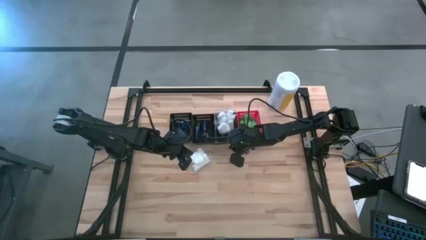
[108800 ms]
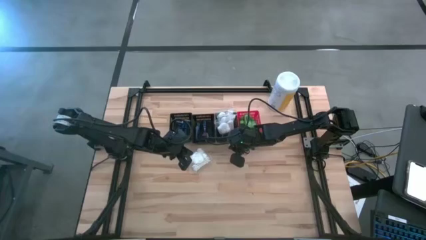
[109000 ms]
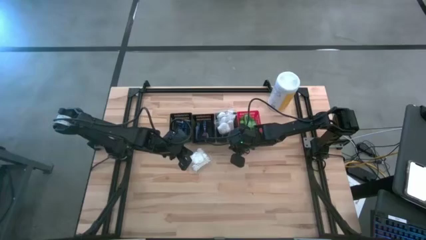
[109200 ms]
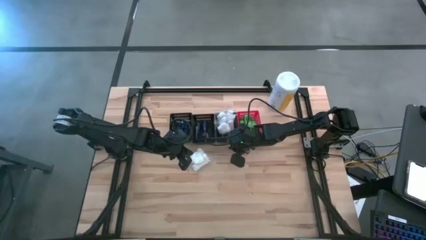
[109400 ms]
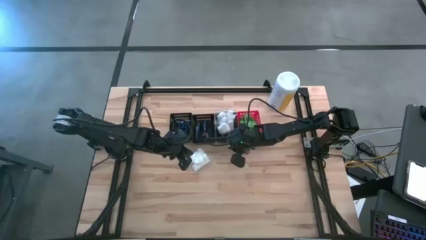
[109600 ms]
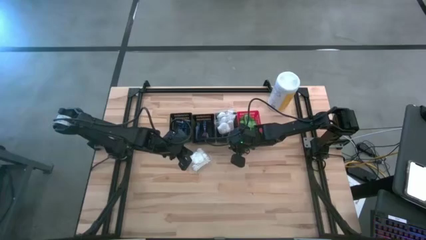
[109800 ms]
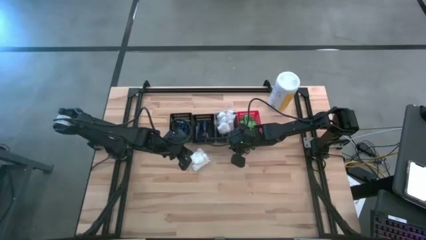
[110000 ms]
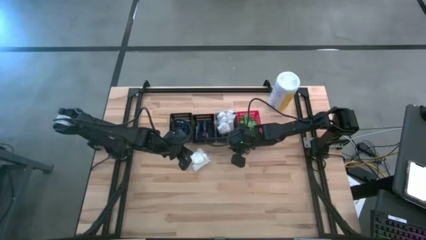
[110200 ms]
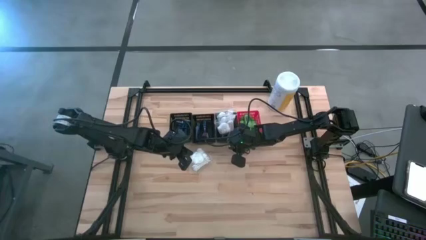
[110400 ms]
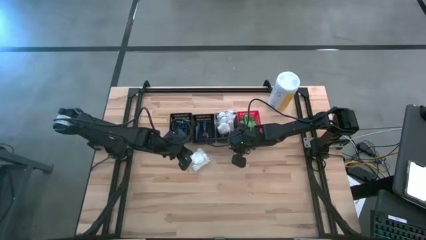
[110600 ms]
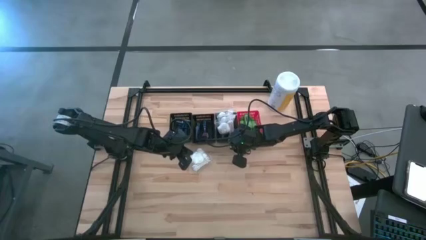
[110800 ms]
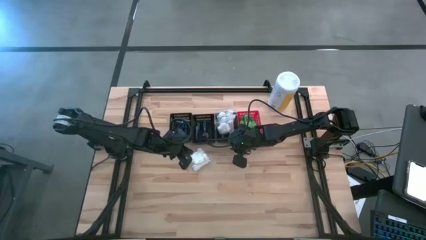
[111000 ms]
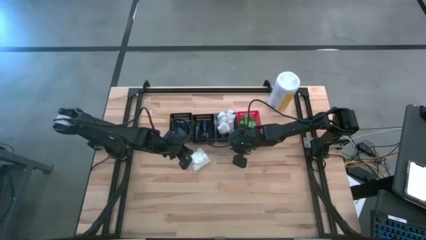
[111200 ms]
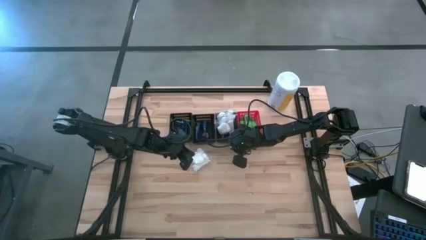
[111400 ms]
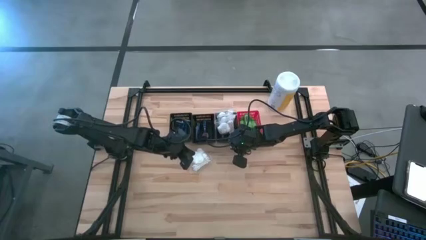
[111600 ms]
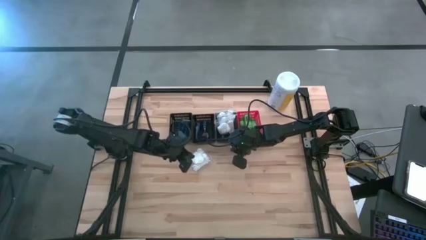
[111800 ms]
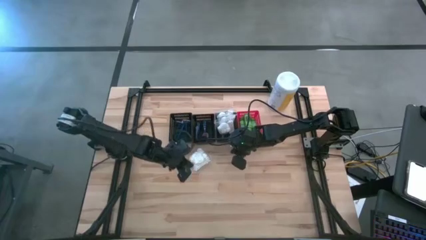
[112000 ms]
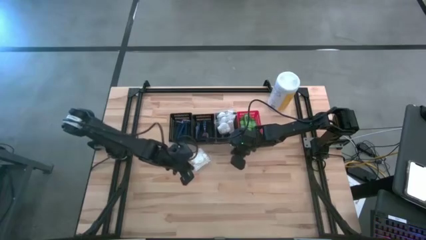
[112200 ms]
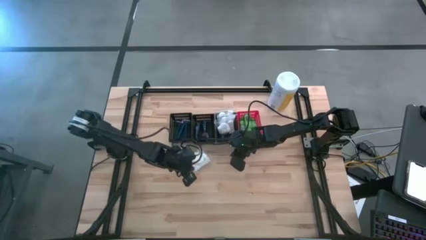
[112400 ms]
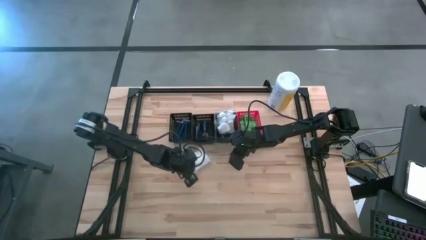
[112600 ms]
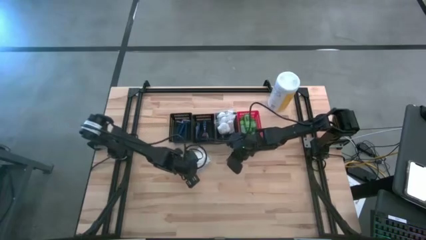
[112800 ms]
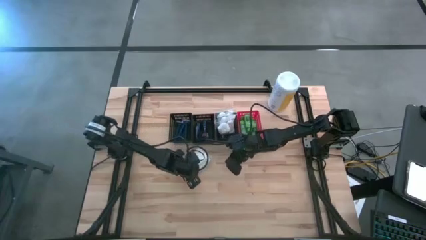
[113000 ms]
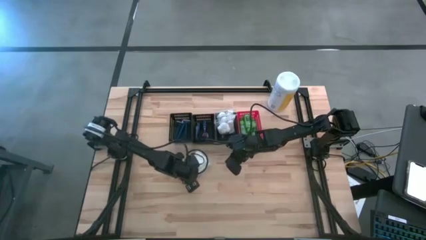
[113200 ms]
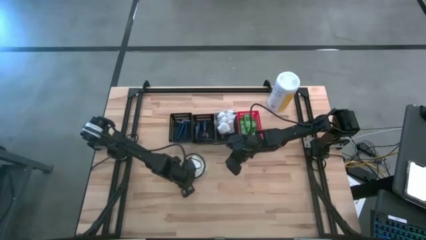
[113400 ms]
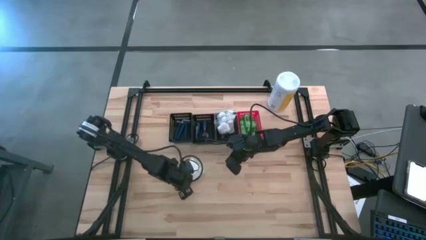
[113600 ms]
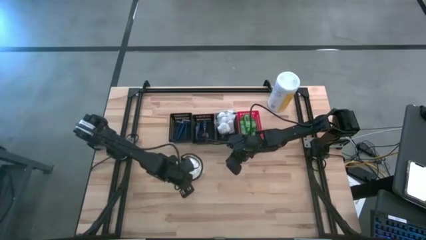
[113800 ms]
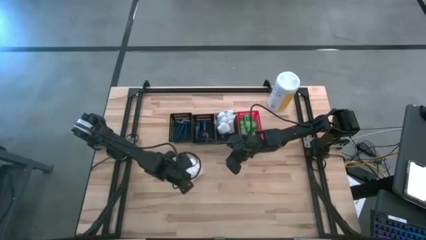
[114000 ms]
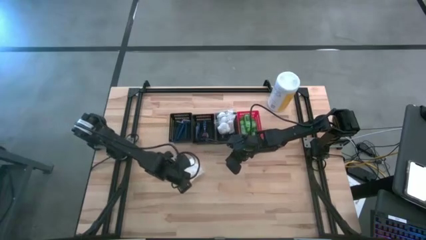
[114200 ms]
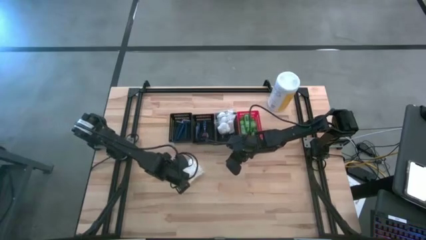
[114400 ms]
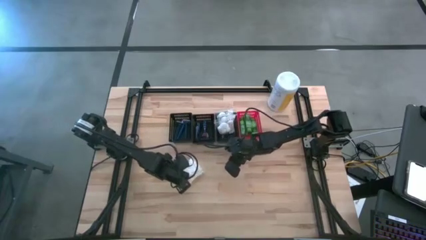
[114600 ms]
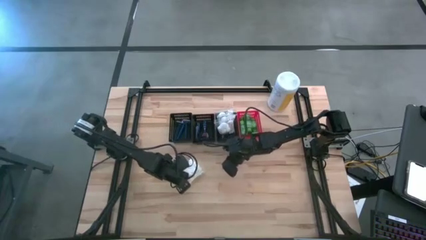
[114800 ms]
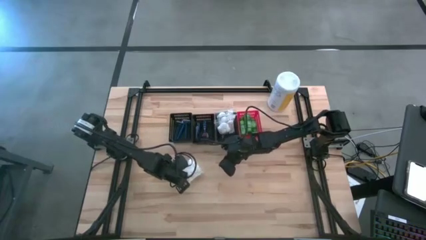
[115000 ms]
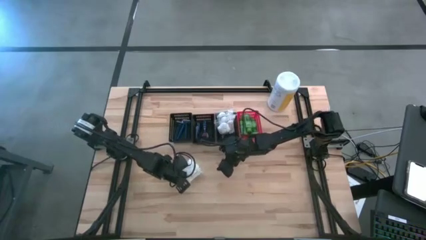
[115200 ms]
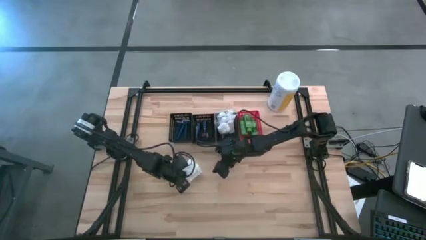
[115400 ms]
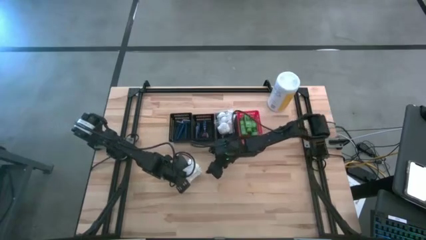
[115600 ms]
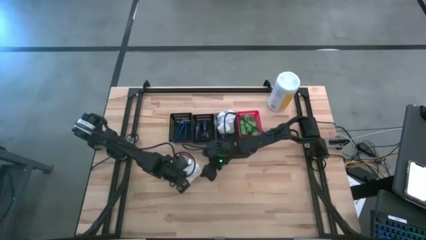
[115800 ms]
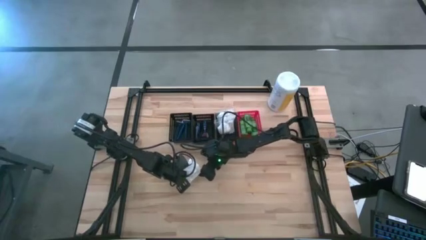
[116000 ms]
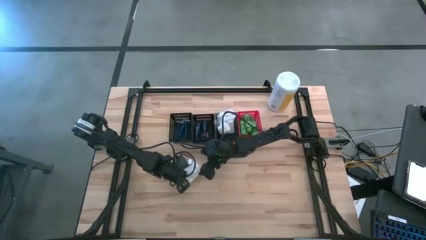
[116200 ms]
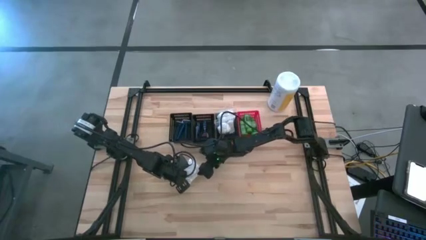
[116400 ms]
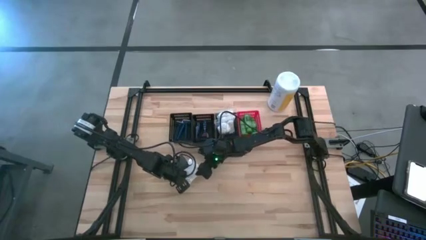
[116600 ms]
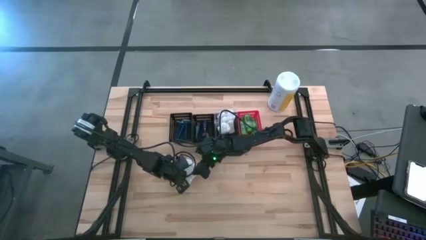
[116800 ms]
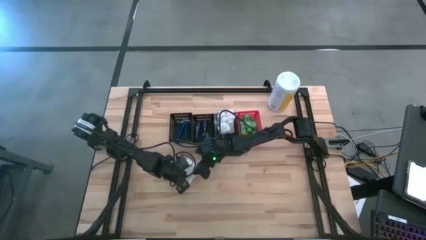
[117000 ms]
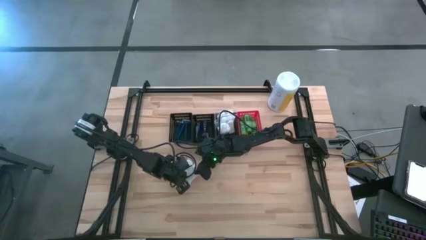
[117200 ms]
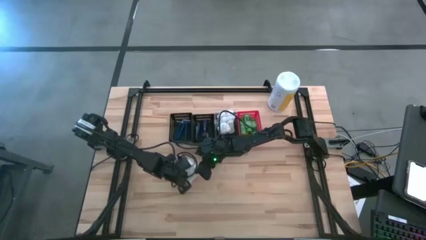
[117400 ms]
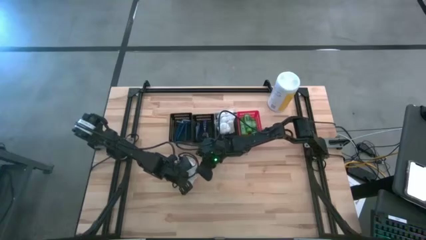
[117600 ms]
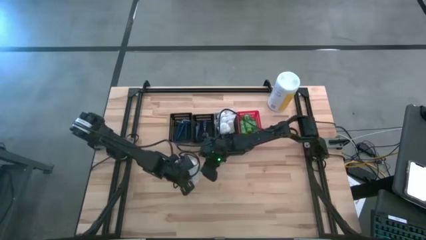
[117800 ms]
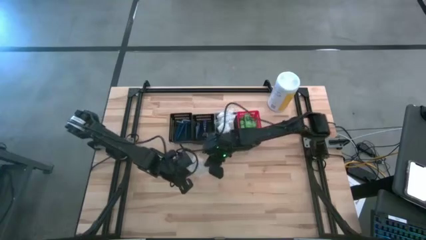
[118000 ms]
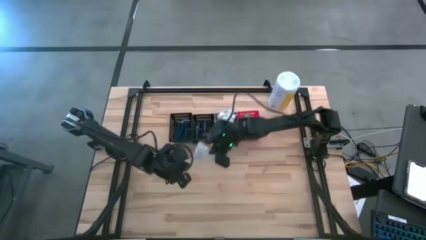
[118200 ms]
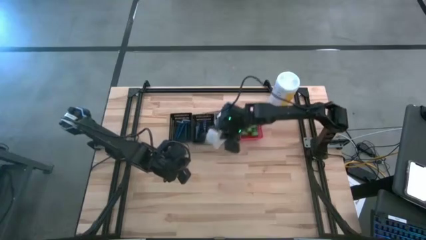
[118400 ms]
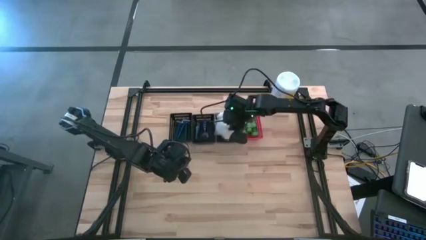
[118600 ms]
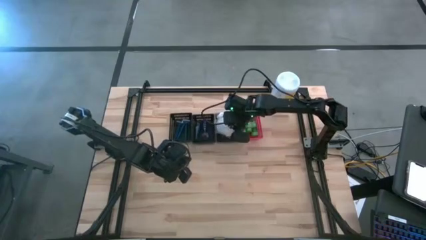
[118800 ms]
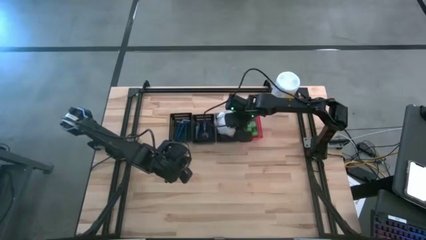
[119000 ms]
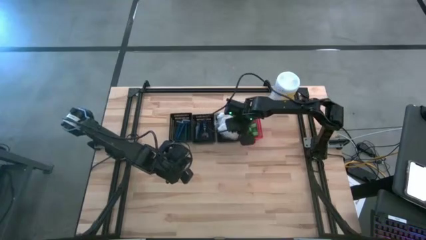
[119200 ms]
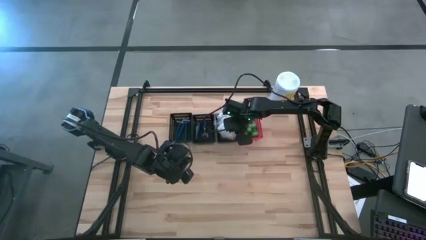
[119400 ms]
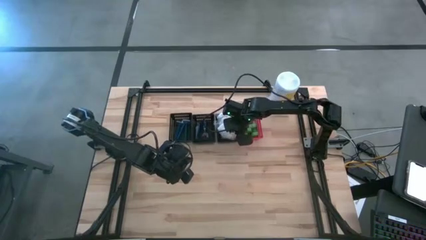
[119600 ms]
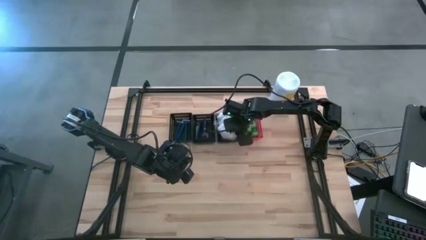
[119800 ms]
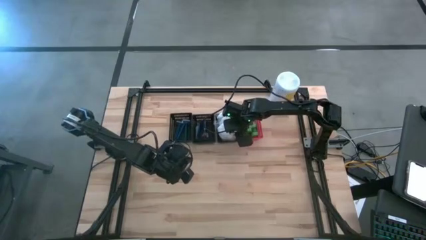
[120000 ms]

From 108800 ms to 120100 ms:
Task: Pick & Place Travel size toiletries
Put the white cotton pack into the right black bin

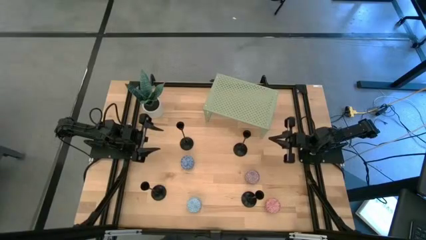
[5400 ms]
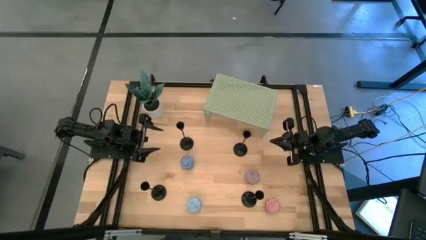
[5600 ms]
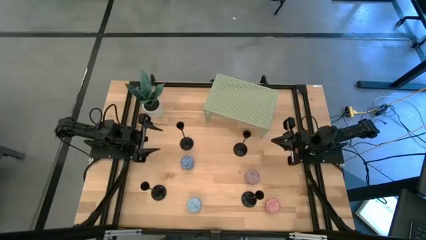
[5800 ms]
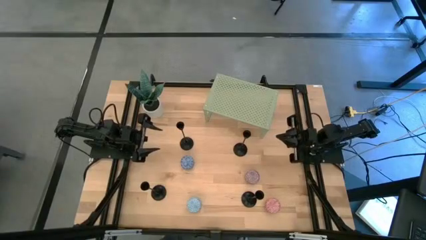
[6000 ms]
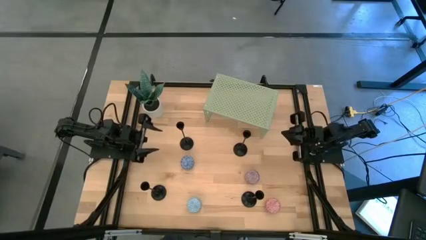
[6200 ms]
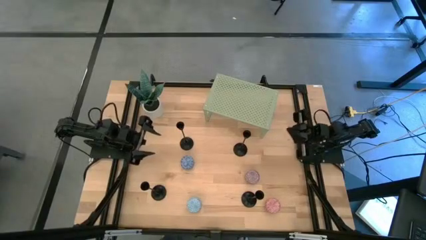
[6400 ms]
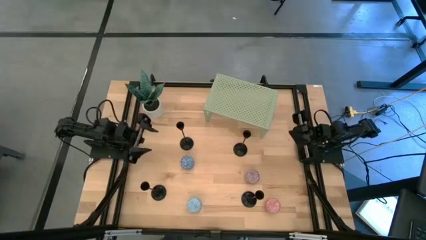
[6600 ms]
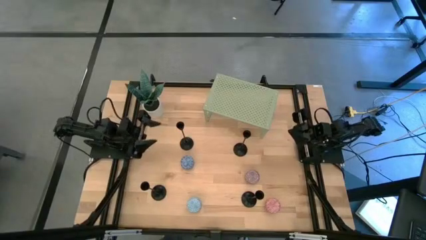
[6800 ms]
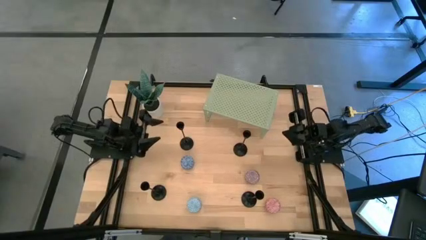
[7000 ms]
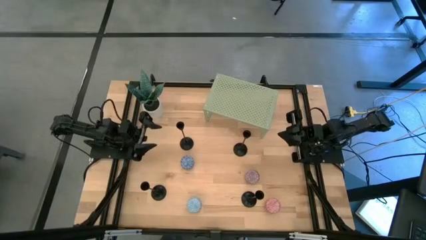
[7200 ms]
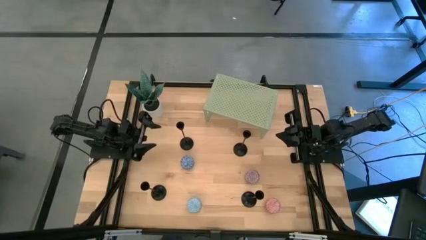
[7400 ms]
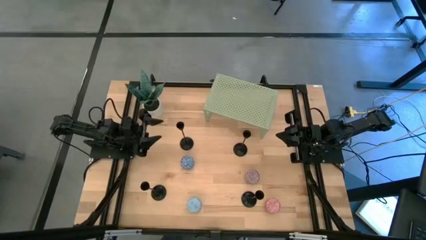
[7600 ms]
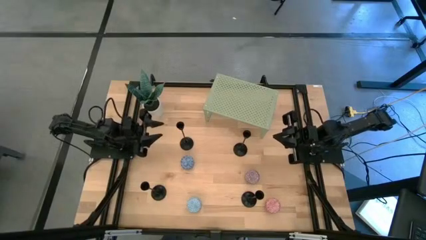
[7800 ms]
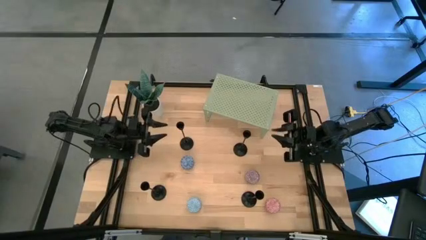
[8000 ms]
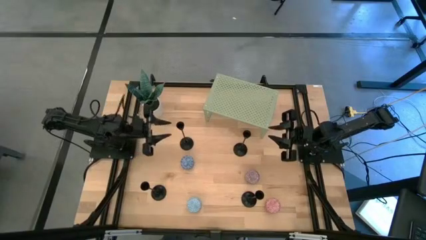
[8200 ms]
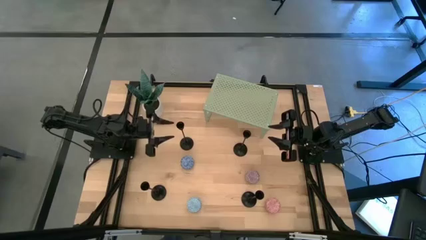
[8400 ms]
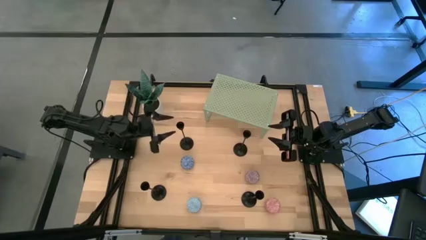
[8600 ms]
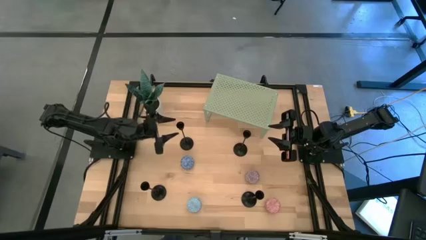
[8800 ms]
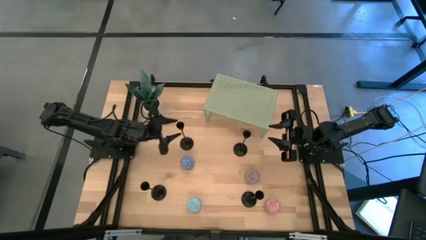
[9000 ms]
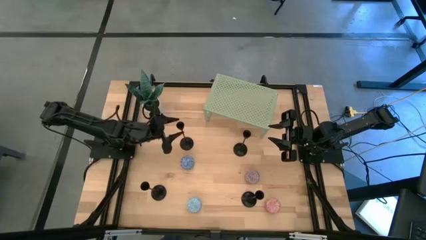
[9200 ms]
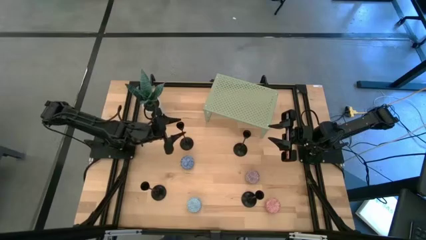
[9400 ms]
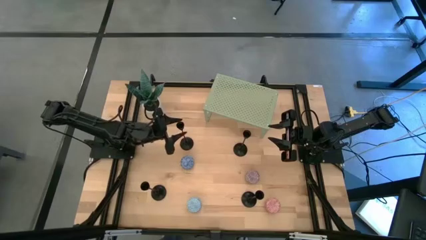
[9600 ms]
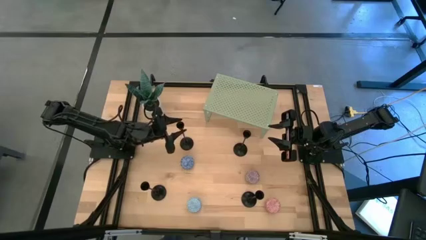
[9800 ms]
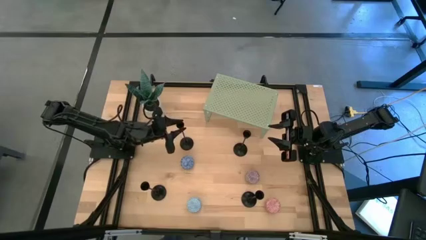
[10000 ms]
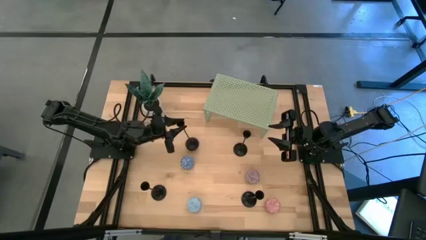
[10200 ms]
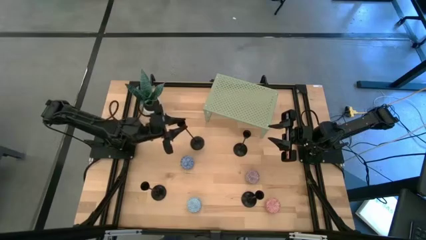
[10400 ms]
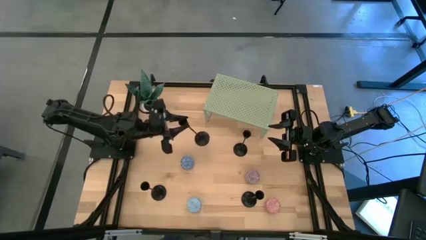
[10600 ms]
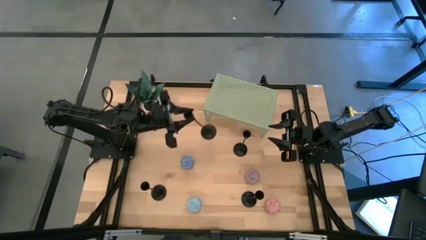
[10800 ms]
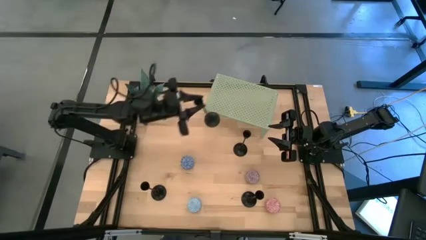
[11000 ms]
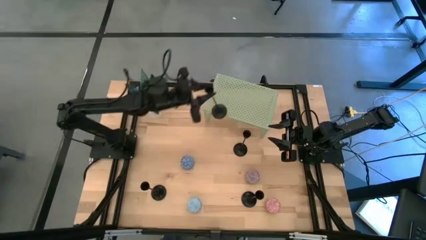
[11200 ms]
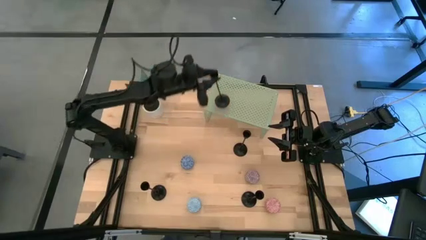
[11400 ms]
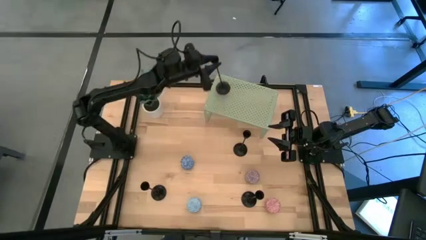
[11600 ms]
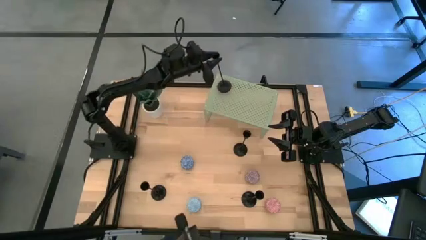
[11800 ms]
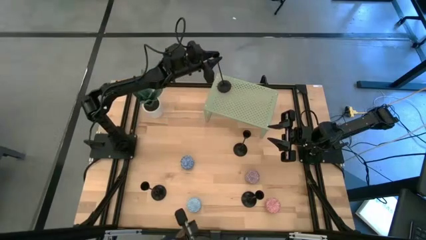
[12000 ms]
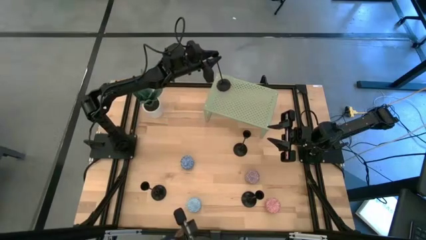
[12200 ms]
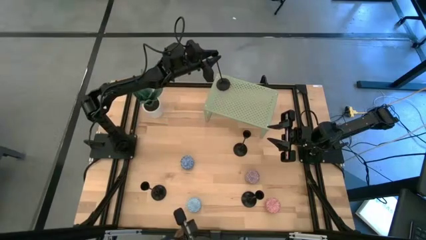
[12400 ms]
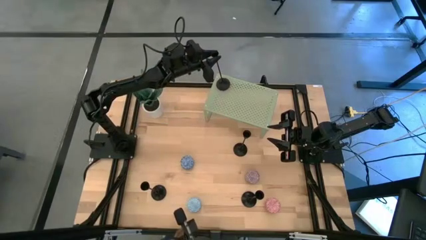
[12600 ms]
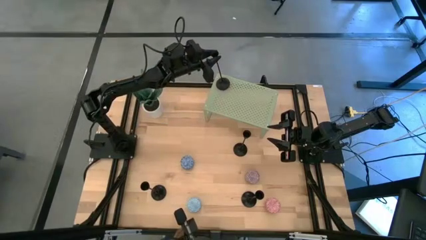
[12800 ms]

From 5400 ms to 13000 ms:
Task: Pick & Place candle stick holders
Put the black candle holder on the shelf
